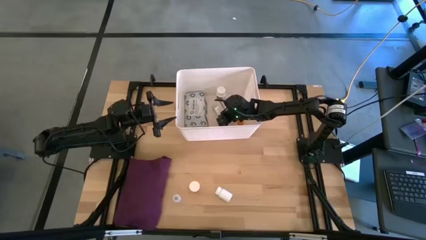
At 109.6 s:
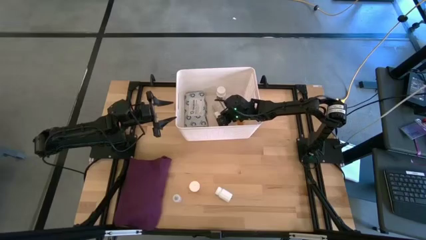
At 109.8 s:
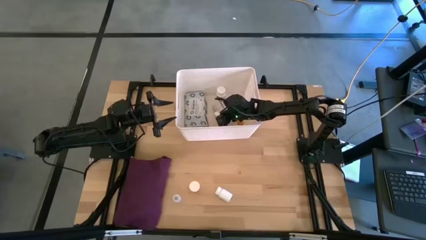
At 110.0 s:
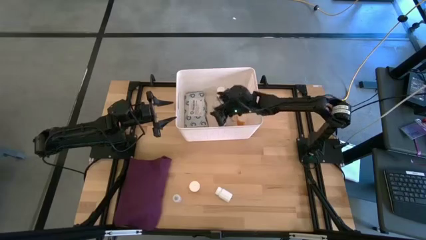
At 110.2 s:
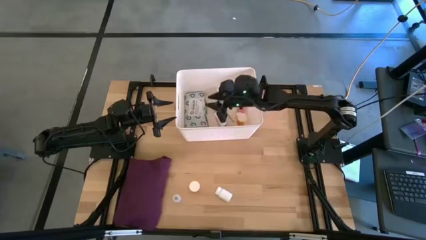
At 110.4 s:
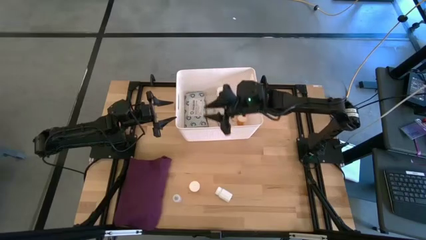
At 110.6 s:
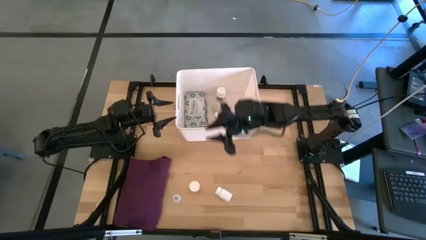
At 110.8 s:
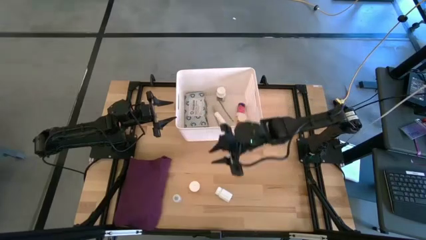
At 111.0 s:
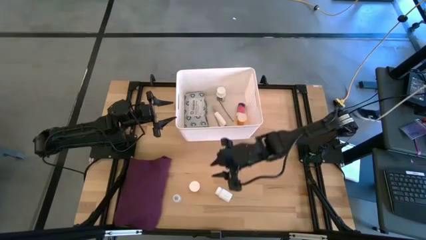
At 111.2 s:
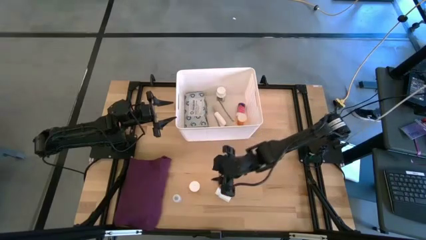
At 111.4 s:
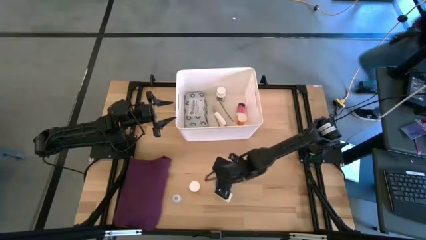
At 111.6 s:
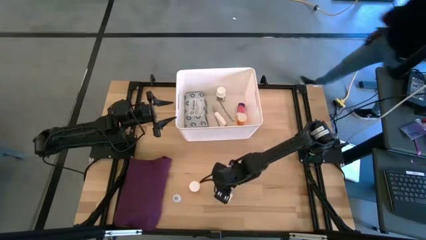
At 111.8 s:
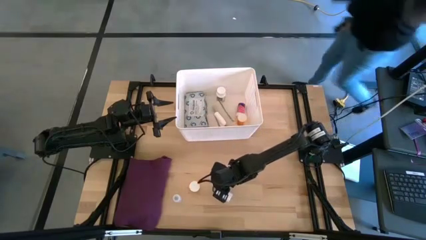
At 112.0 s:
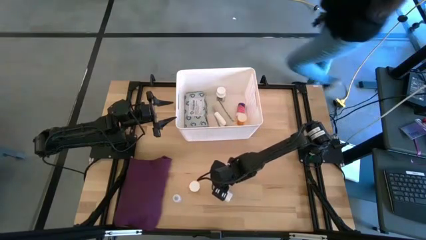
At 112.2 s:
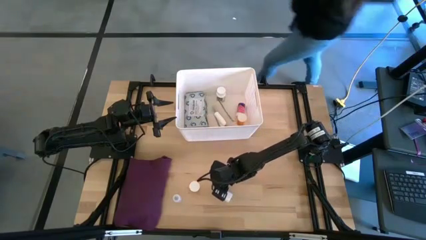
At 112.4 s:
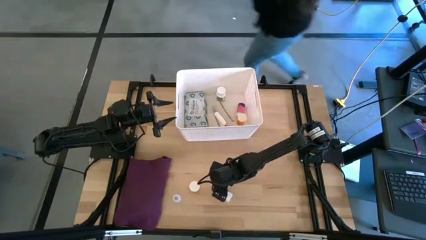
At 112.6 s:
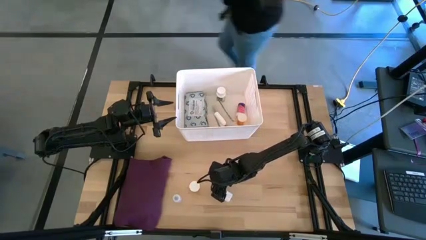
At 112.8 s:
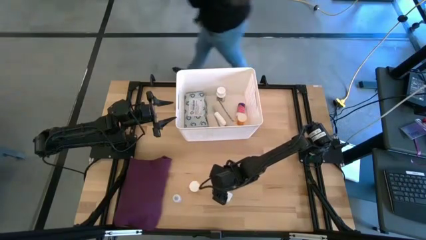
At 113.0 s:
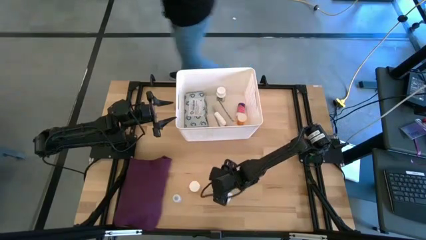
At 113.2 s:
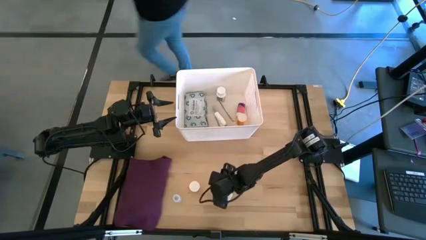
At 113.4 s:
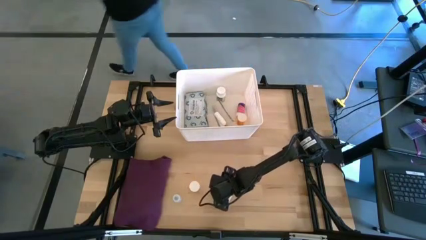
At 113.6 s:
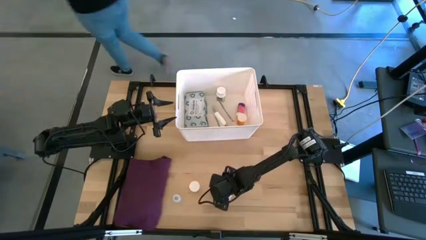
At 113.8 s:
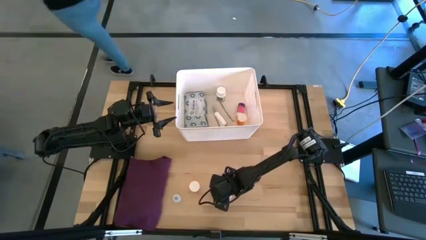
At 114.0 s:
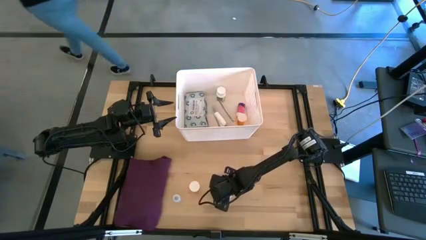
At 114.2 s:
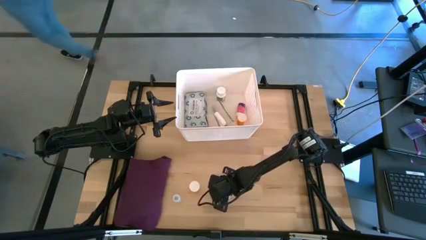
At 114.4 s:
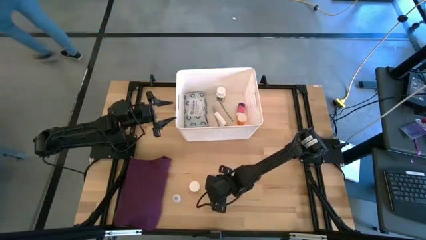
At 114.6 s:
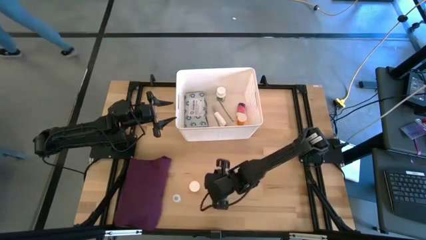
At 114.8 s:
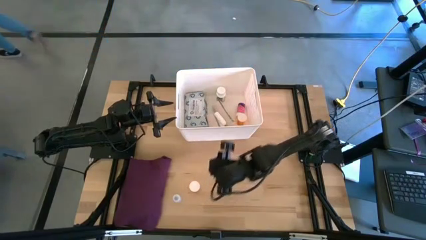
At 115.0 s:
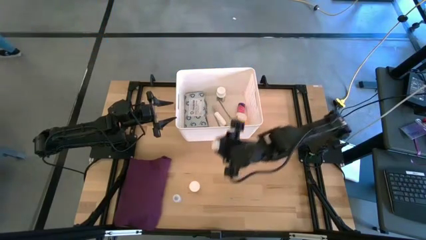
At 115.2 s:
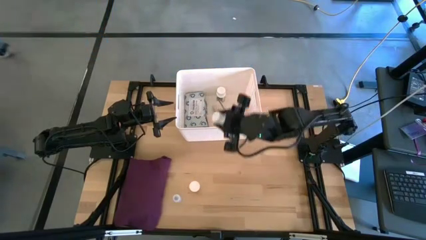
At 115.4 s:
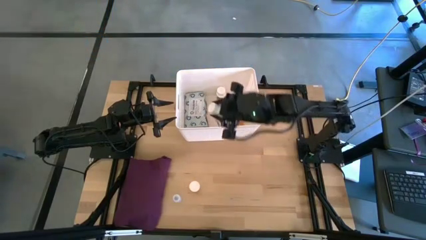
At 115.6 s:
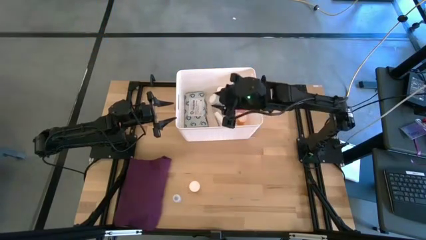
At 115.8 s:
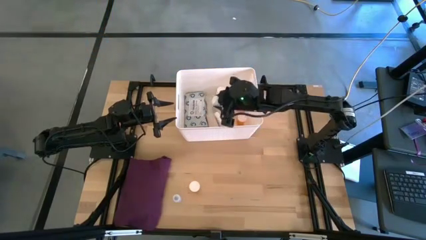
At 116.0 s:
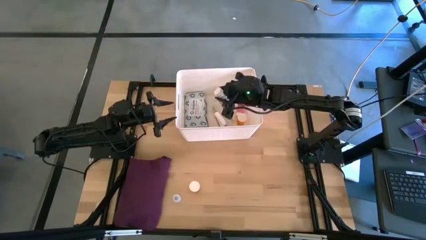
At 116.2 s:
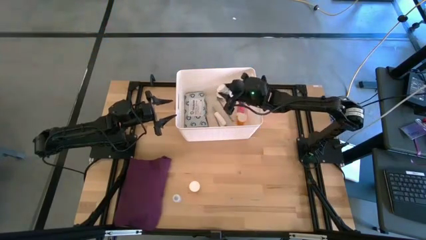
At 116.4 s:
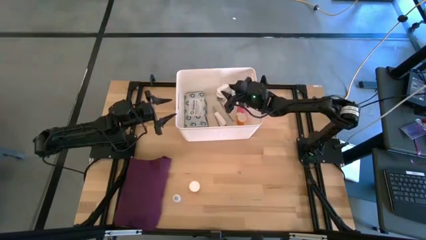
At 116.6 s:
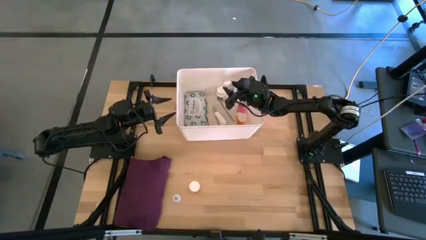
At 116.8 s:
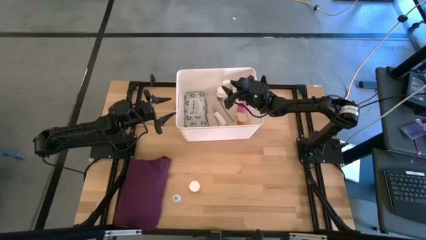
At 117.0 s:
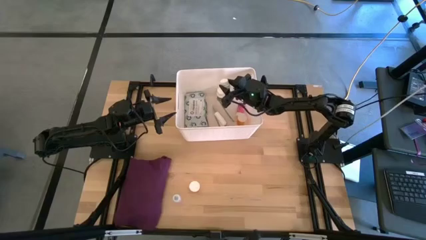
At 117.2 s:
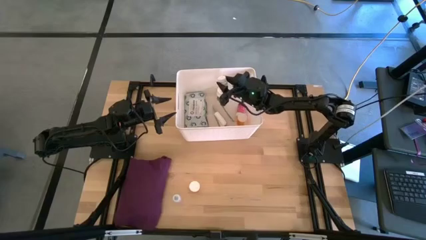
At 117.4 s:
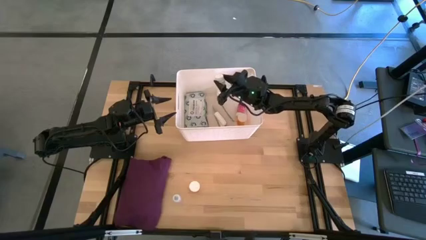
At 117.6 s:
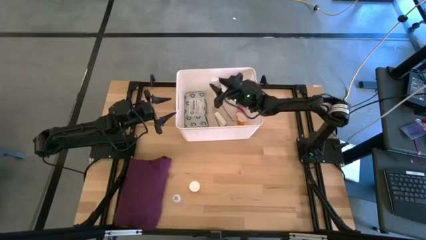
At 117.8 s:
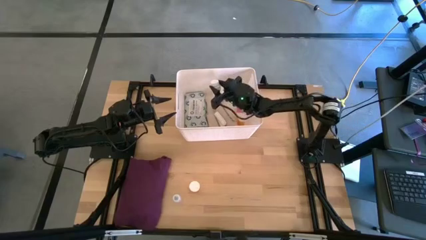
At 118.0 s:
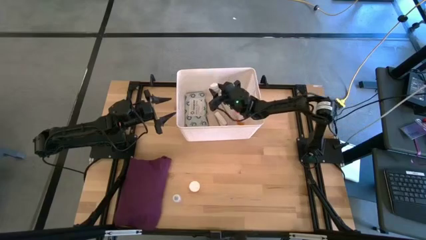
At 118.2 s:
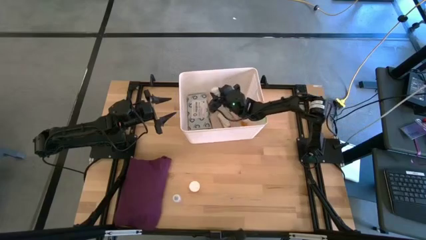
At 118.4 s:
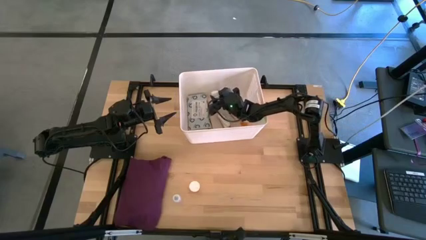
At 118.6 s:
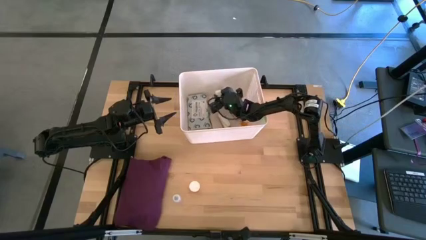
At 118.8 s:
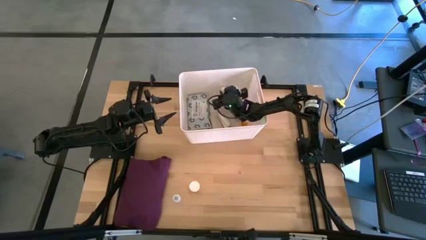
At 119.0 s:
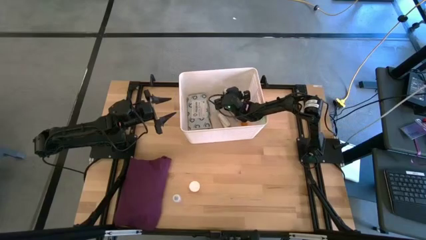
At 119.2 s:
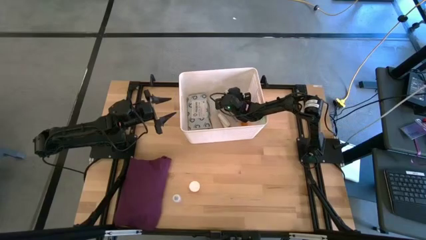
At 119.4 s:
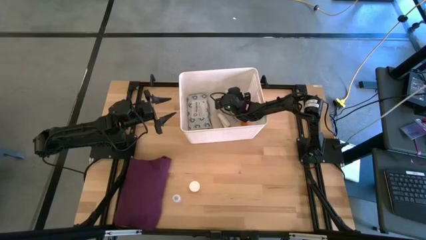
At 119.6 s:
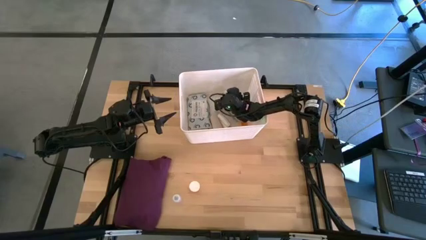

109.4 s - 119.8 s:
Task: Pick & place medical supplies in basket/bin
Put the white pill bottle into the white bin

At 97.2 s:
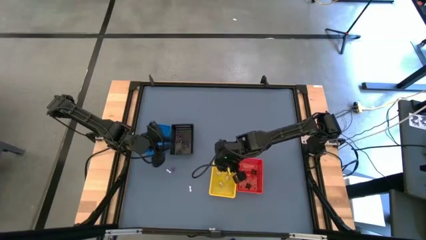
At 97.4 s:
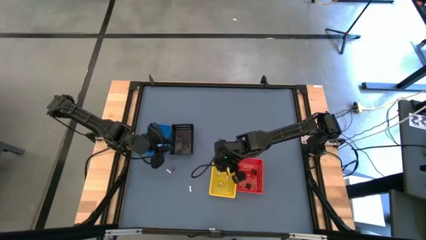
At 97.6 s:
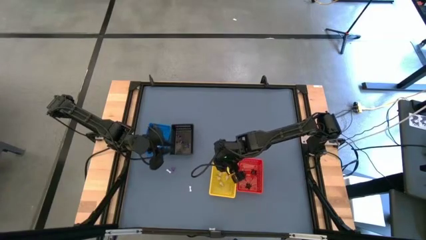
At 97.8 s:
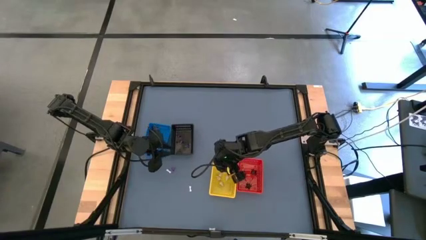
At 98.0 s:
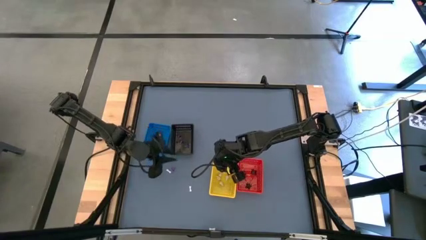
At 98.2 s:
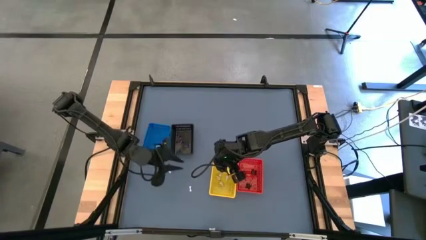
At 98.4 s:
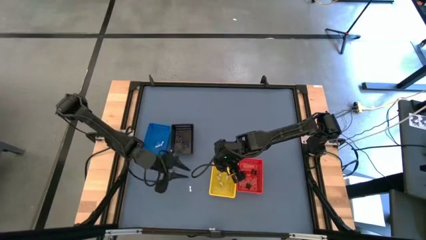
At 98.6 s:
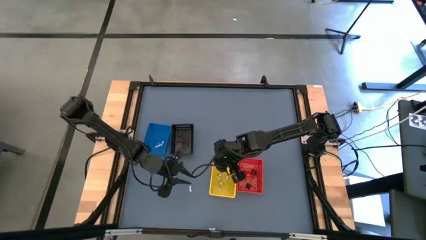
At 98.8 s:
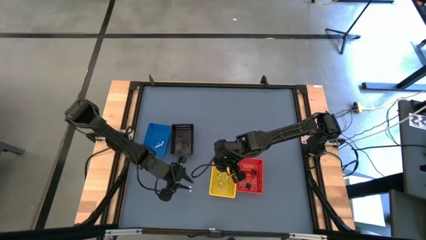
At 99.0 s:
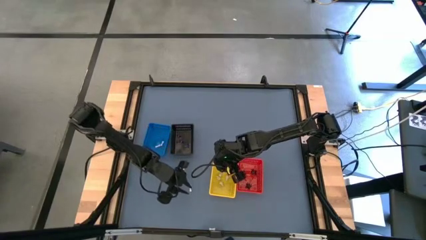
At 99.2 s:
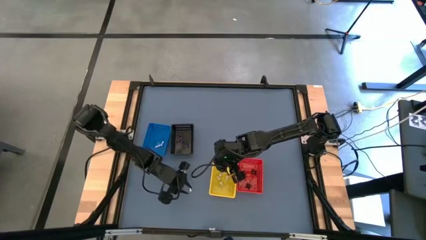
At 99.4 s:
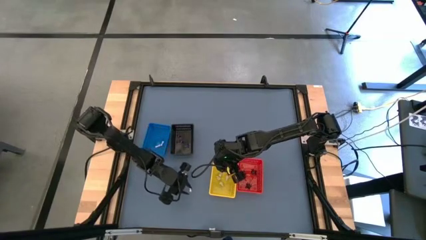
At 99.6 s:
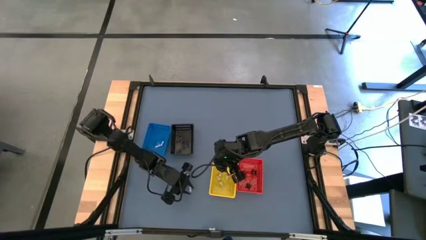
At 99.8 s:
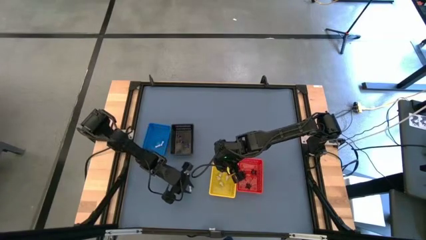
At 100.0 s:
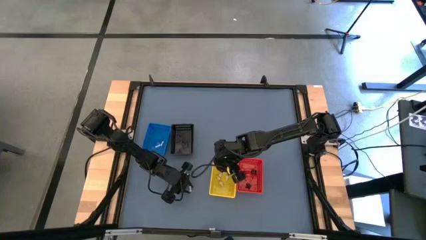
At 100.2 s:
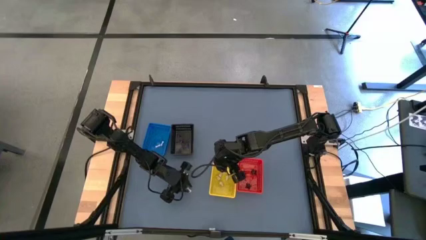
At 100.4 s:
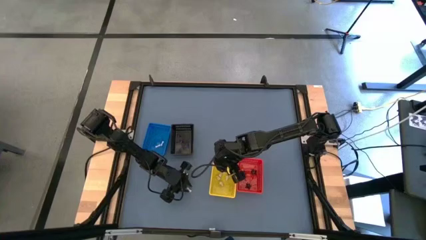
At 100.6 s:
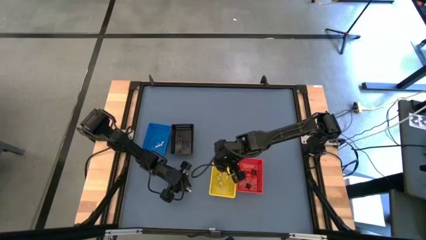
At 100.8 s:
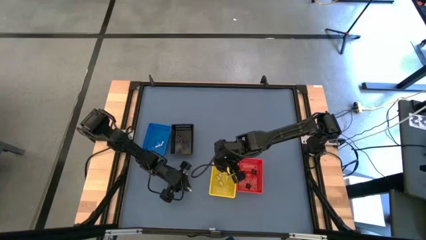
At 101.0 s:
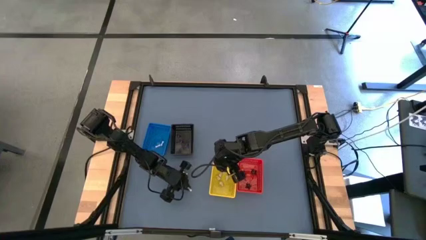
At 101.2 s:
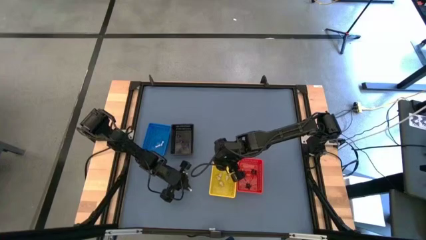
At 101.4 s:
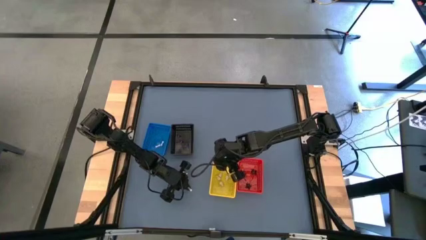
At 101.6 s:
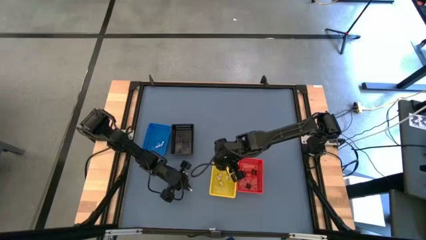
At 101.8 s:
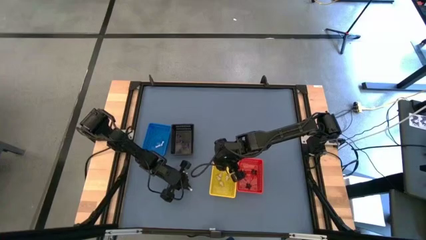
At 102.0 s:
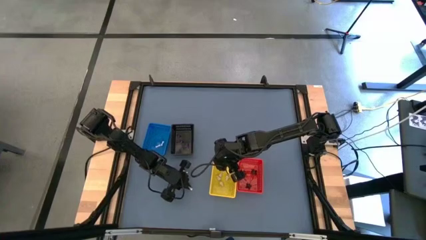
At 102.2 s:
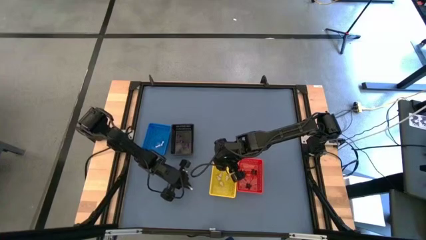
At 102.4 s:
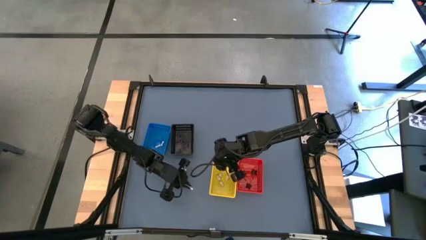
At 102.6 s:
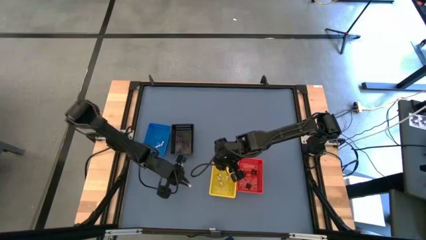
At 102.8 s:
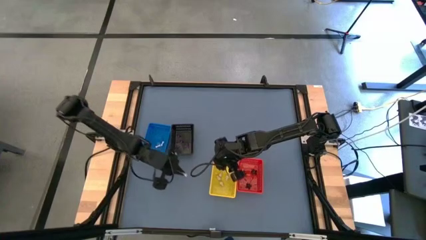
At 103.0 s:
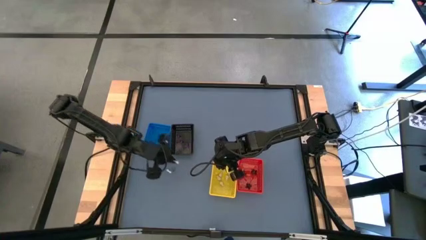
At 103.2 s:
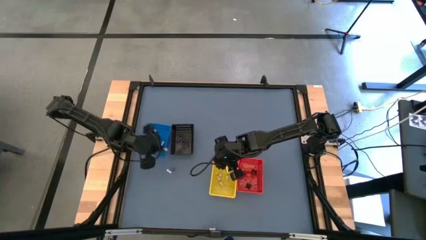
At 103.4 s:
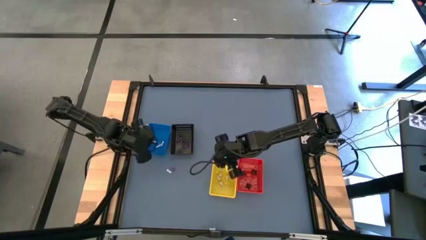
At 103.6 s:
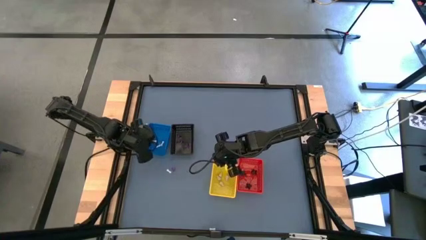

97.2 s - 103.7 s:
Task: Sort Halloween decoration
Put the bone toy into the blue bin
